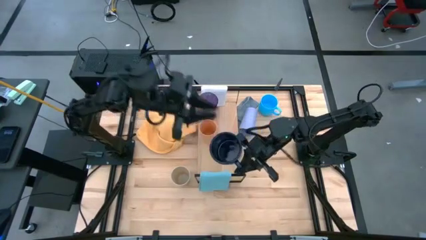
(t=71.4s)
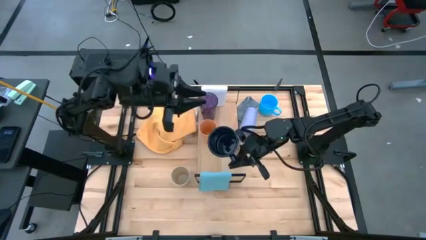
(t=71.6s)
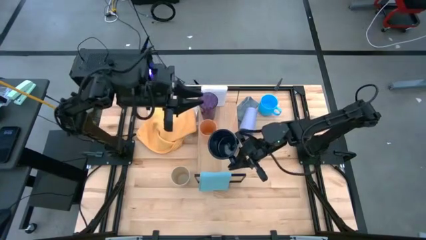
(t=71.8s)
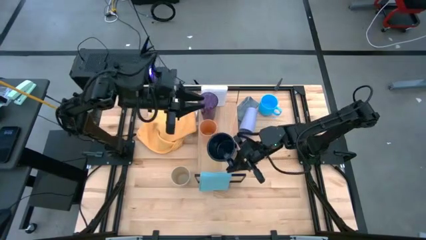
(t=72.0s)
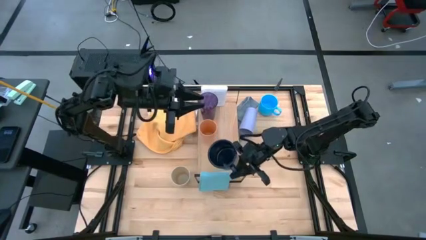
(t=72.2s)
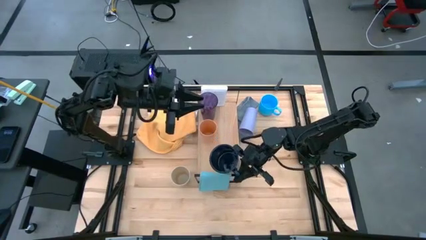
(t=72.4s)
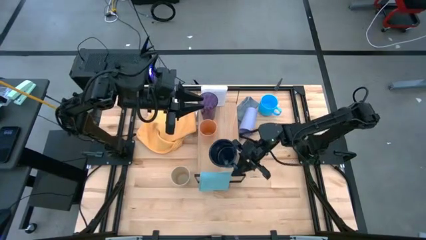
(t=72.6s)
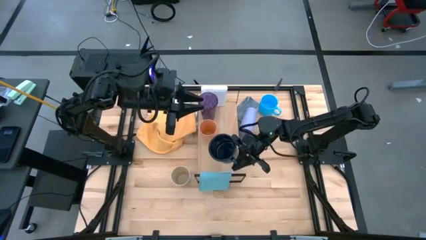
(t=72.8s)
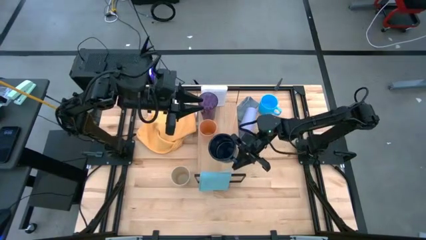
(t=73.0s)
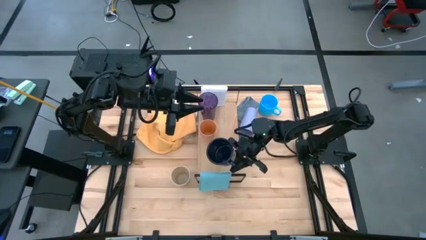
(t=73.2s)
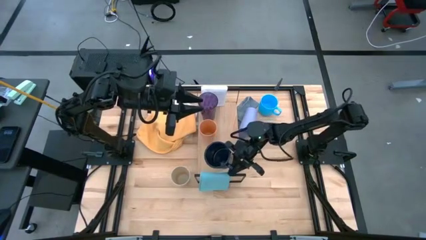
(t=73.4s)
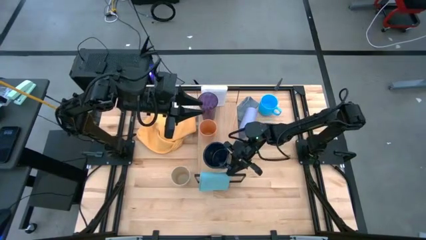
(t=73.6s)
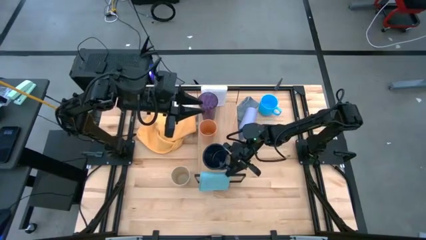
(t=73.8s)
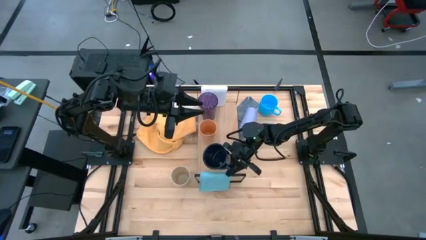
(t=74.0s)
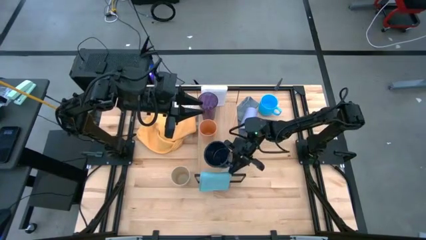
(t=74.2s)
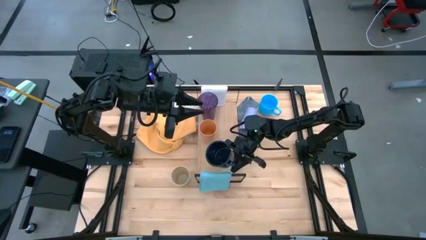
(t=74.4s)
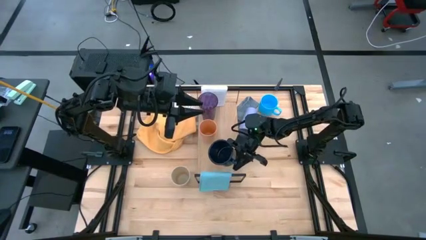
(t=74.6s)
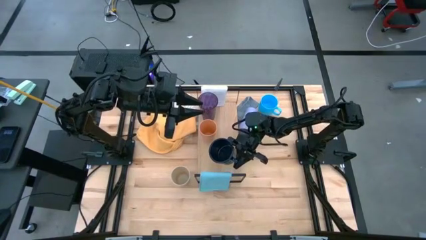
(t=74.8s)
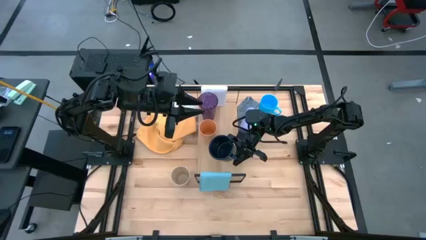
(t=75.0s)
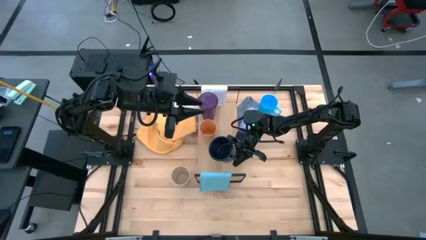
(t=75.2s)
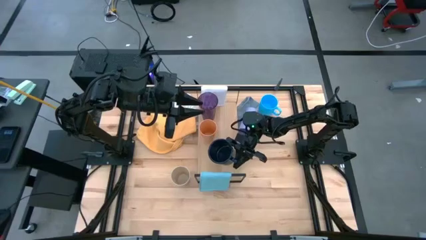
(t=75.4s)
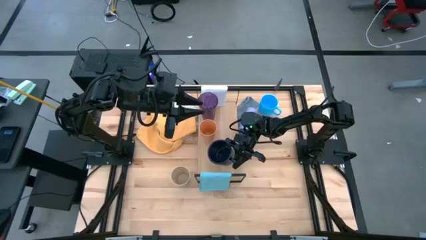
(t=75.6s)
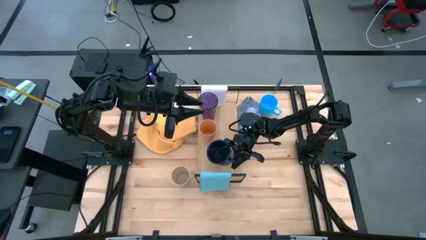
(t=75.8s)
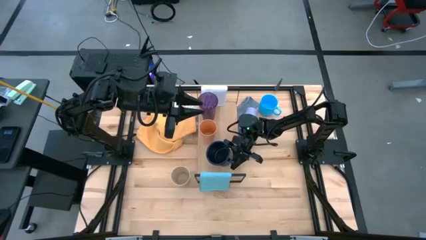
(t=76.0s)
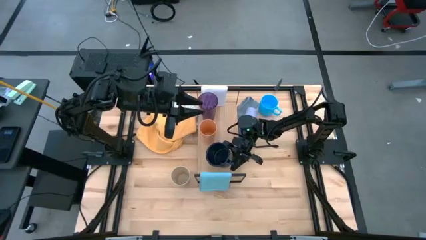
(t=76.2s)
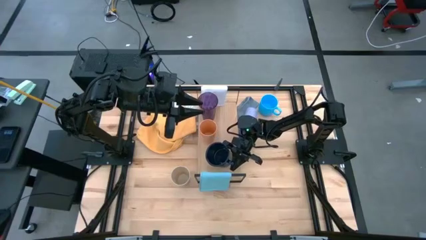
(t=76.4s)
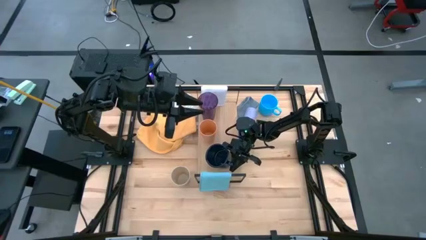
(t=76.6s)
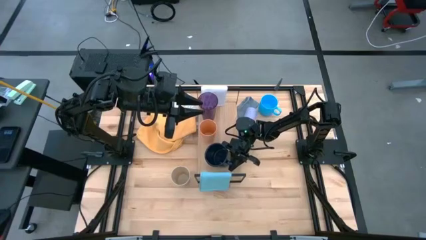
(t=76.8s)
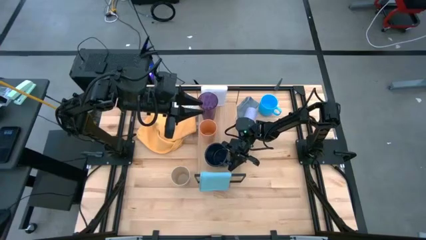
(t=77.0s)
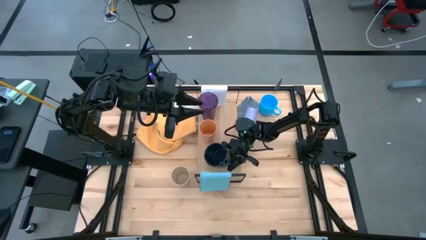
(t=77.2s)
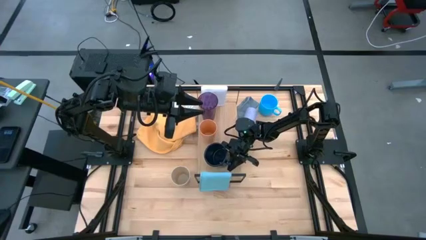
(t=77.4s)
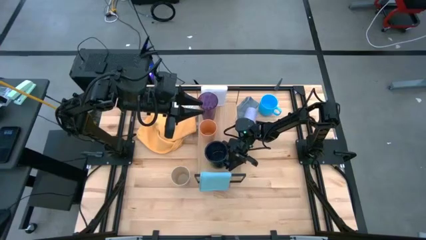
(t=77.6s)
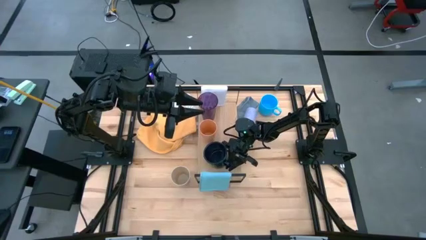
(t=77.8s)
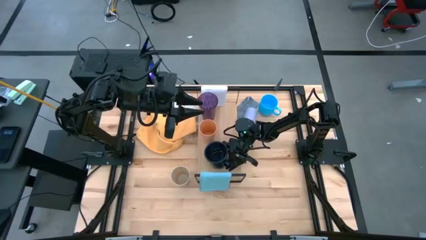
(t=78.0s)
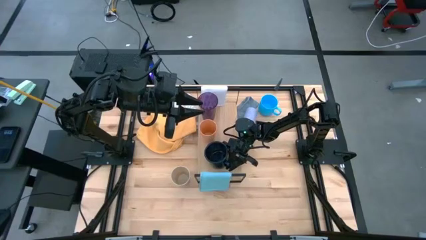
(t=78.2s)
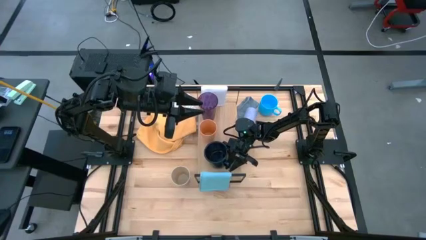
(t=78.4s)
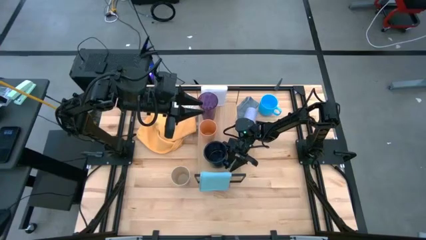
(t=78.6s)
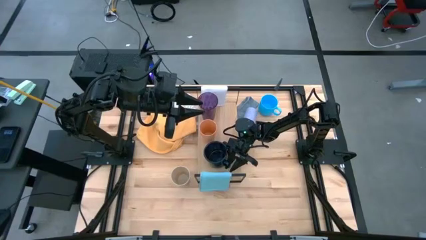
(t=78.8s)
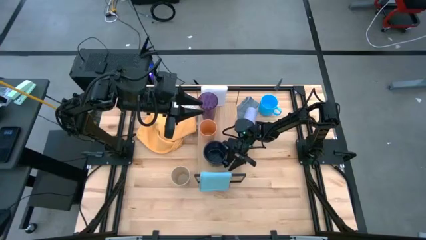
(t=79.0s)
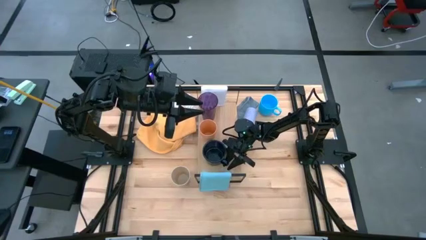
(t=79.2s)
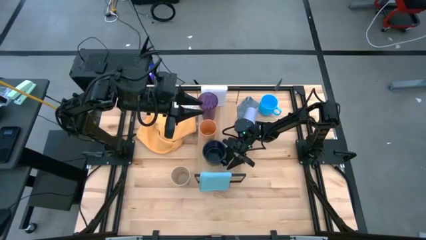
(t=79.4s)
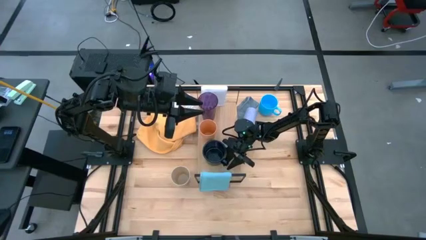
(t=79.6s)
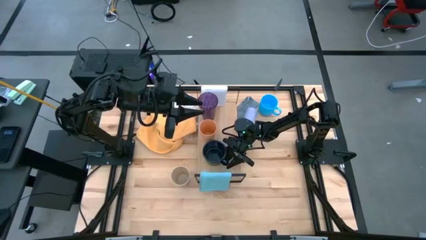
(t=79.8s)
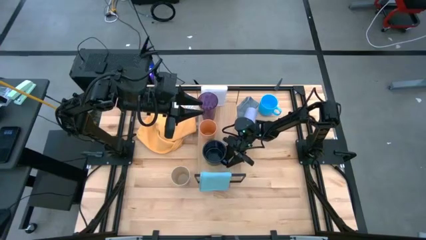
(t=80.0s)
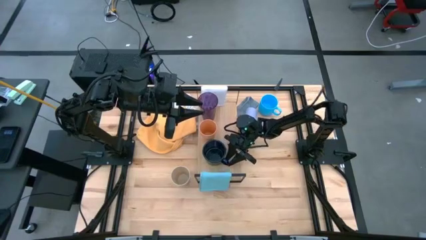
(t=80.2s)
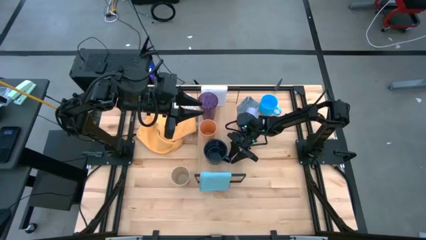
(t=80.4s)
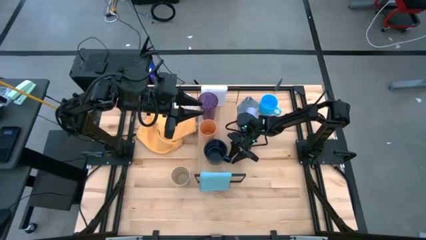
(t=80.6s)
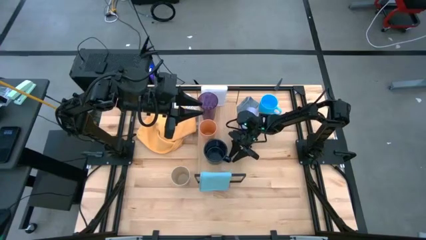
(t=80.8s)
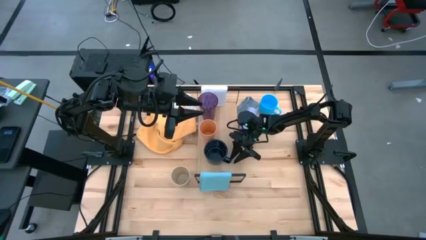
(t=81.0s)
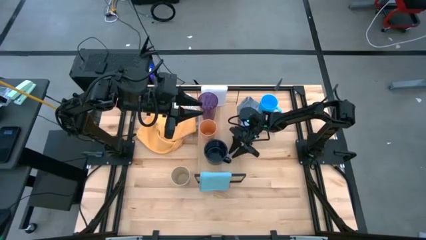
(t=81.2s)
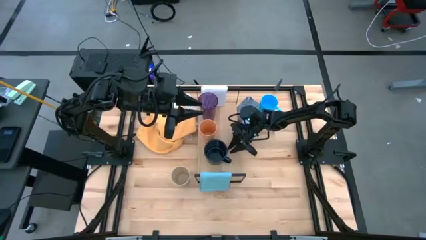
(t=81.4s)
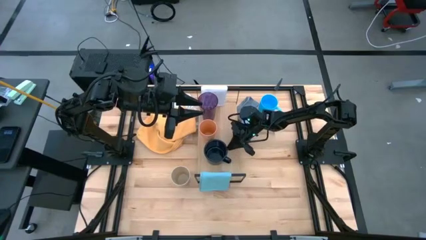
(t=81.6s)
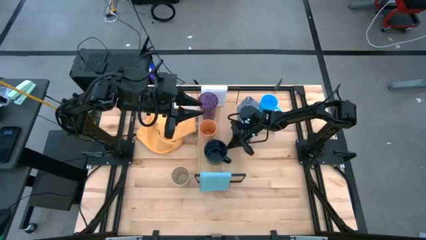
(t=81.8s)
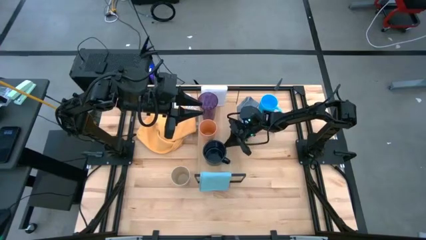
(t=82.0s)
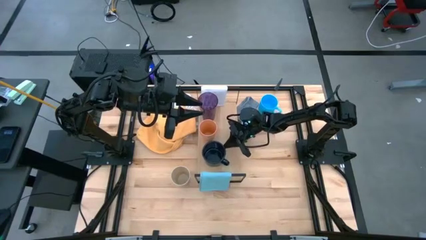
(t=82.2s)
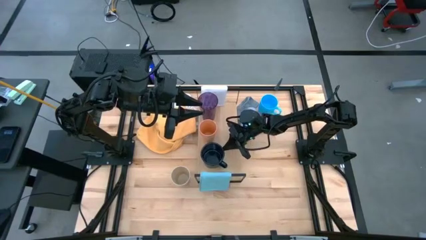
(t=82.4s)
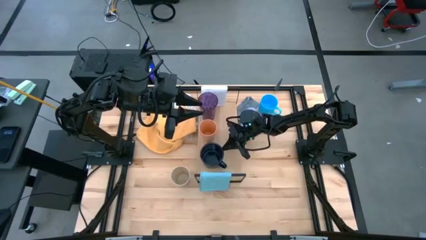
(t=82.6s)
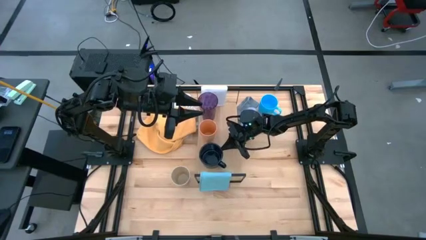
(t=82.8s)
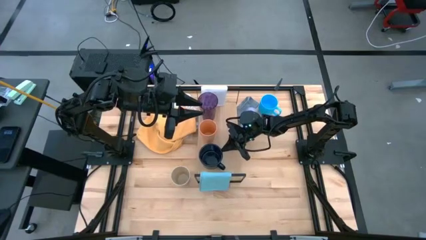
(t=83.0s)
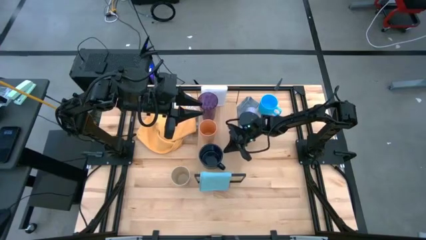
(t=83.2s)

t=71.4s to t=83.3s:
Task: Stack small to large cups/mugs on shelf
Put the dark blue mug on the shelf

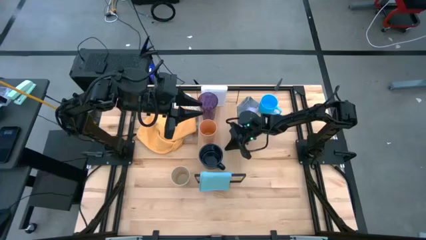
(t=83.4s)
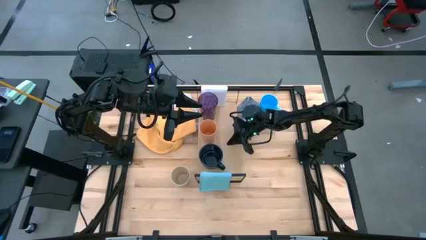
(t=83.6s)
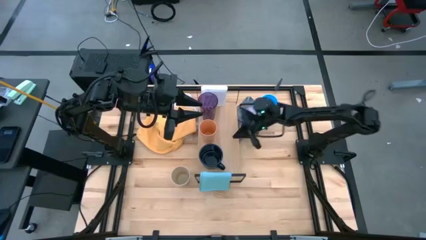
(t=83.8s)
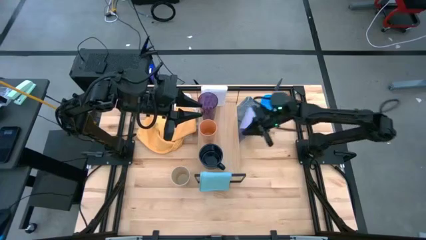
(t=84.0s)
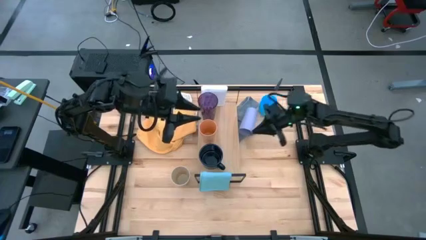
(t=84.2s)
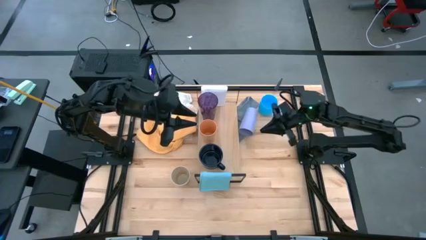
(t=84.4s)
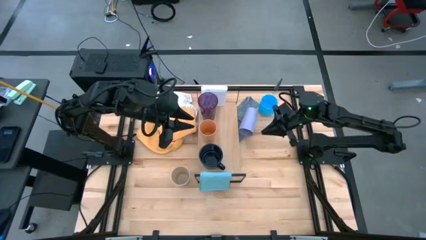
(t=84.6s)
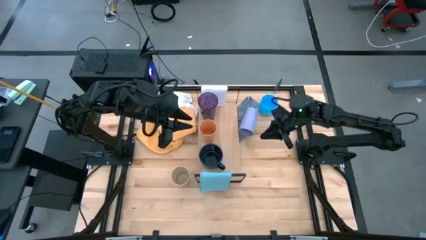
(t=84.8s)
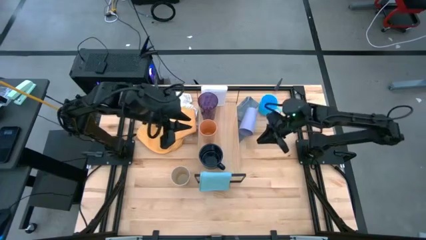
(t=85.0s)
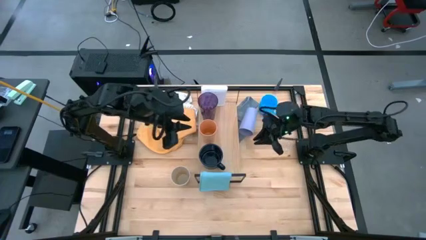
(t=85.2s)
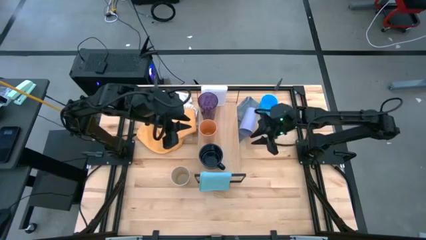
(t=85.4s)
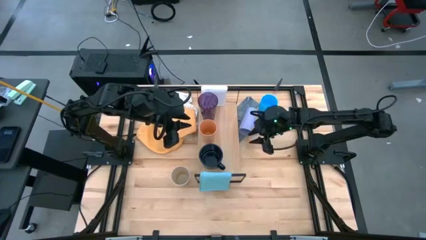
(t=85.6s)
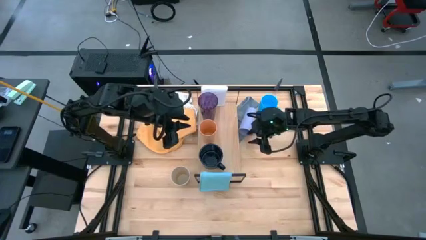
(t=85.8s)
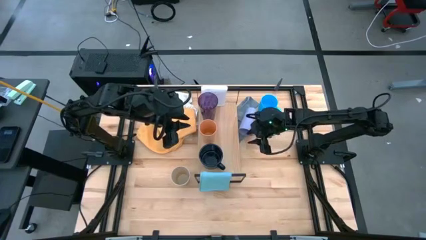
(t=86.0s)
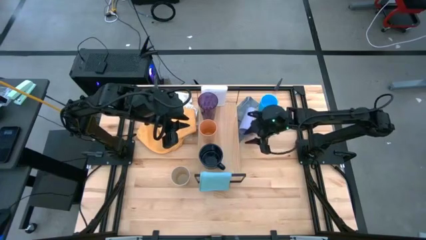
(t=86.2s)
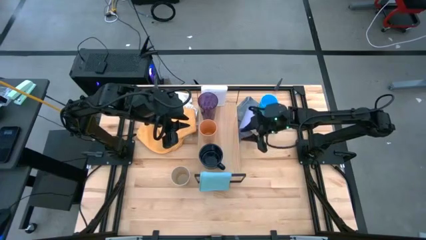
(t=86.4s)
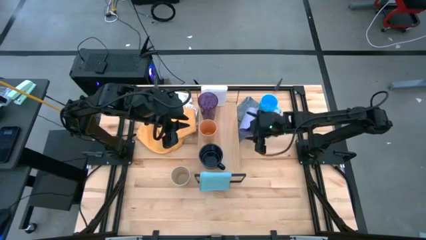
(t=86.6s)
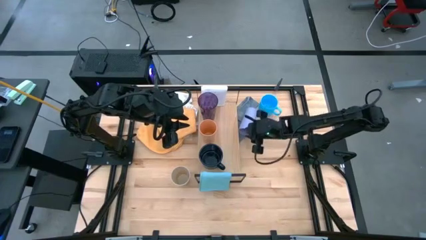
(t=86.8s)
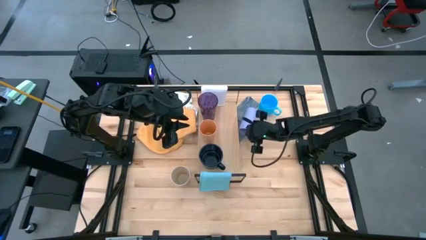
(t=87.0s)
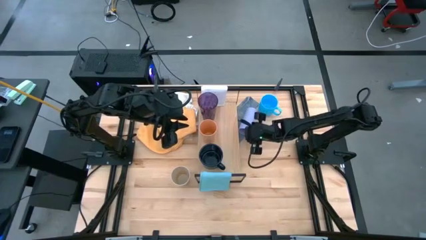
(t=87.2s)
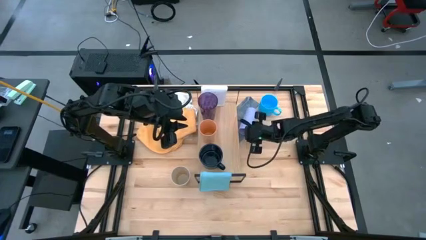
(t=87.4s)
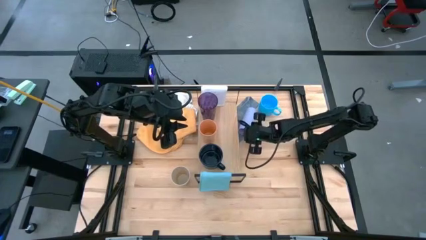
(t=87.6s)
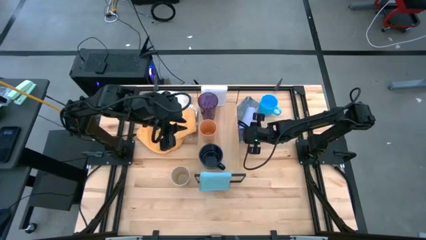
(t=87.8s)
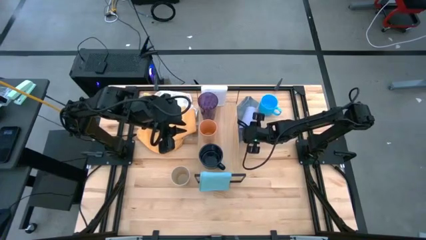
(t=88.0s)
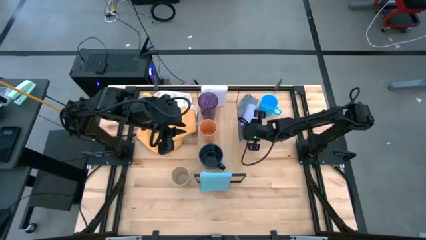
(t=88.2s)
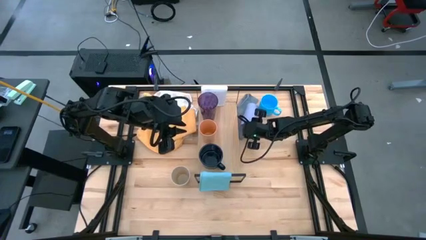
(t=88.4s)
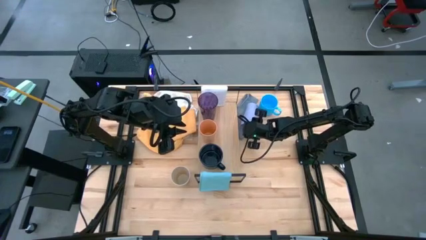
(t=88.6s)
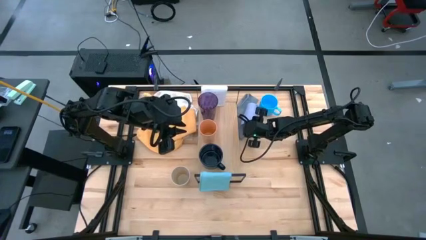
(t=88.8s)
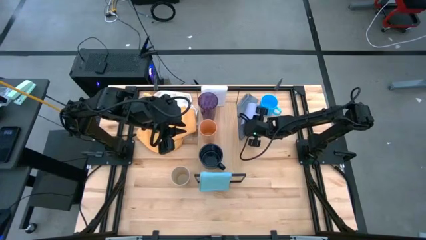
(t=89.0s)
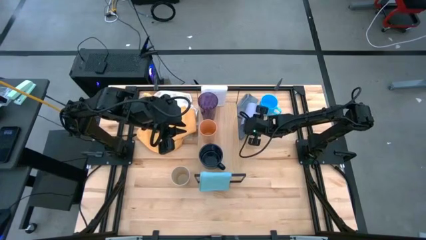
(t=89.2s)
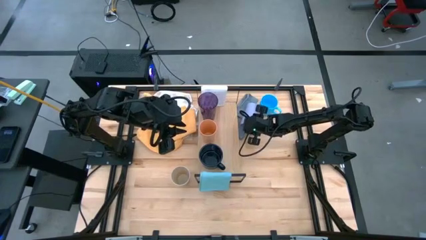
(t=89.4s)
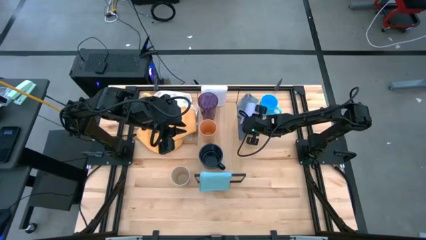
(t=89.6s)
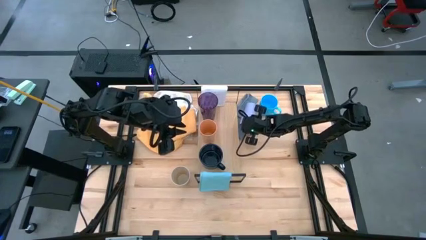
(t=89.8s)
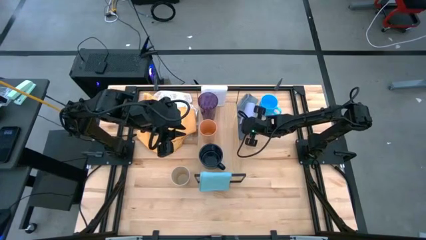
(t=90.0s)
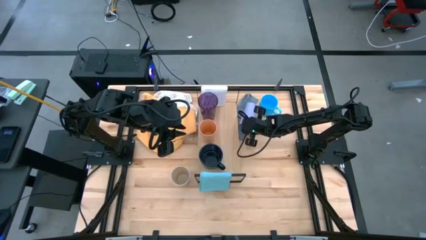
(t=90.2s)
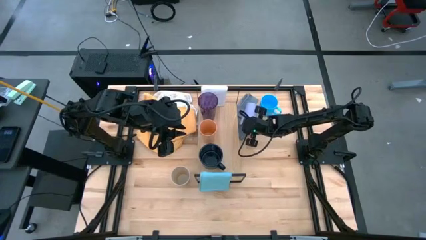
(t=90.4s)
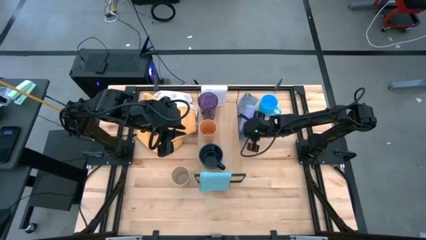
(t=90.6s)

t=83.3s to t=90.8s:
Put the light violet cup on the shelf
